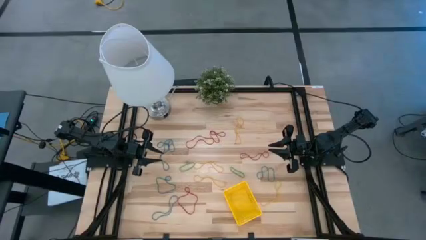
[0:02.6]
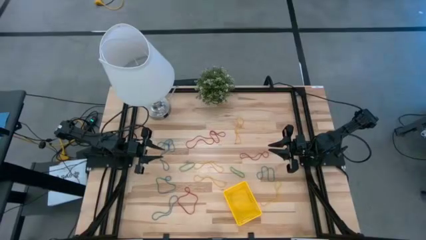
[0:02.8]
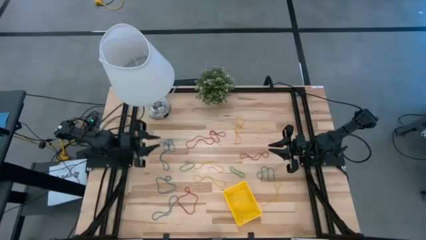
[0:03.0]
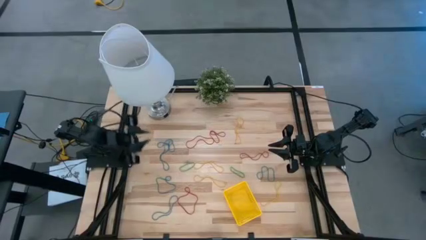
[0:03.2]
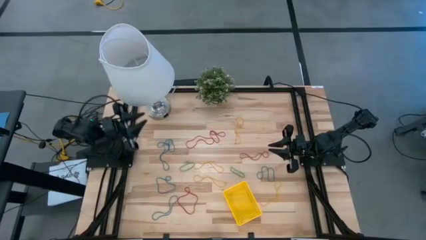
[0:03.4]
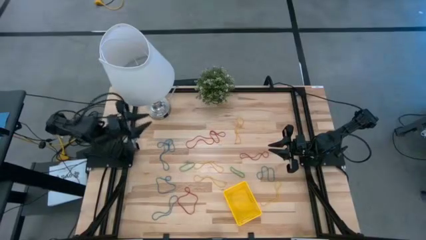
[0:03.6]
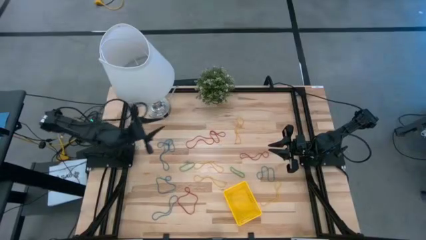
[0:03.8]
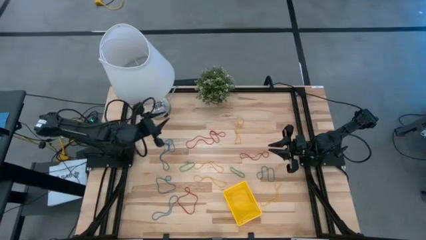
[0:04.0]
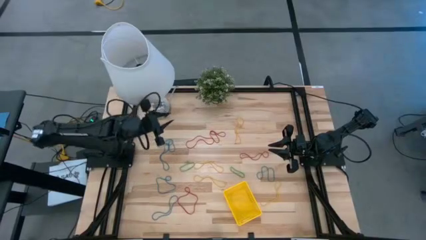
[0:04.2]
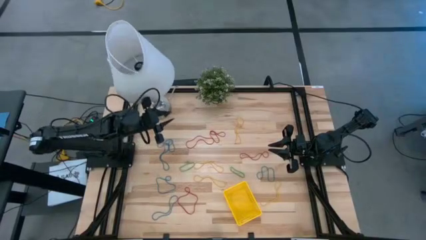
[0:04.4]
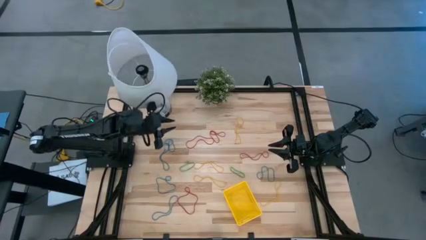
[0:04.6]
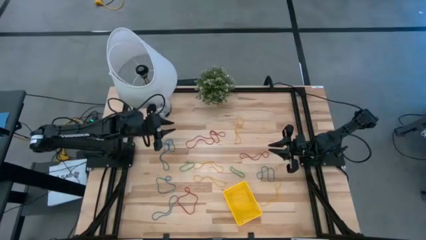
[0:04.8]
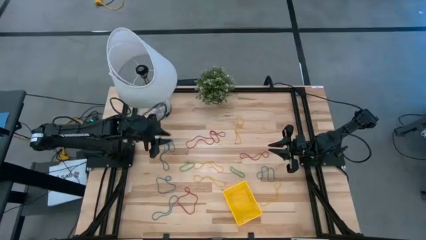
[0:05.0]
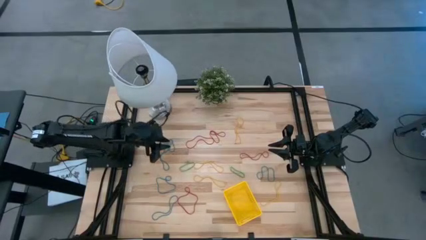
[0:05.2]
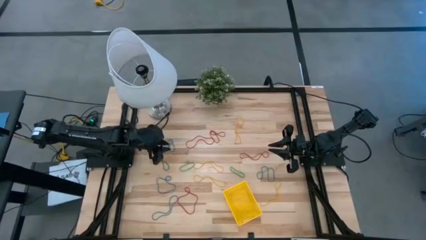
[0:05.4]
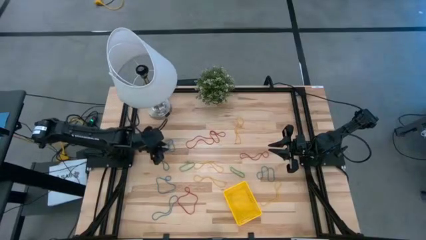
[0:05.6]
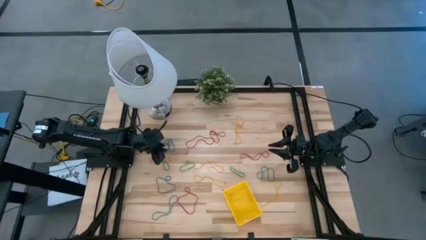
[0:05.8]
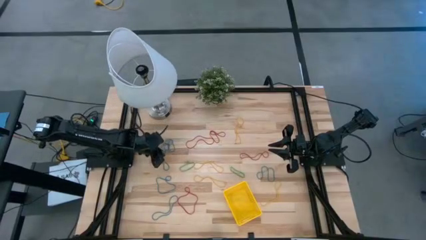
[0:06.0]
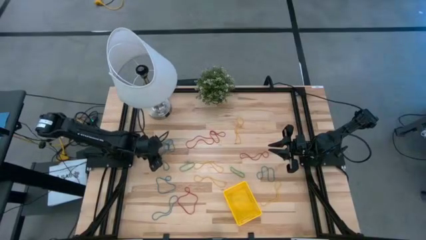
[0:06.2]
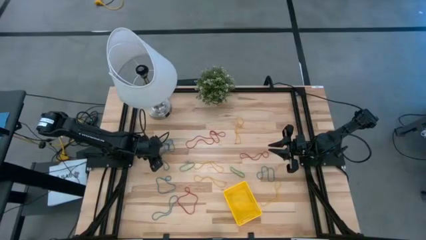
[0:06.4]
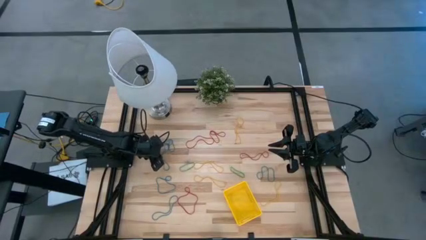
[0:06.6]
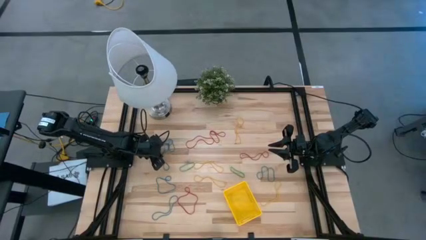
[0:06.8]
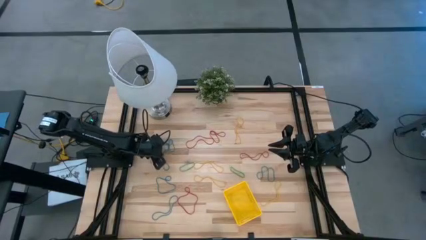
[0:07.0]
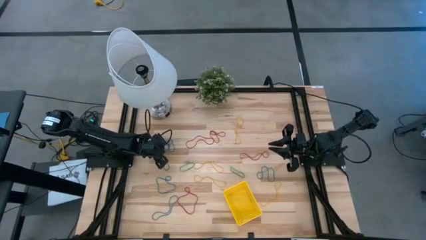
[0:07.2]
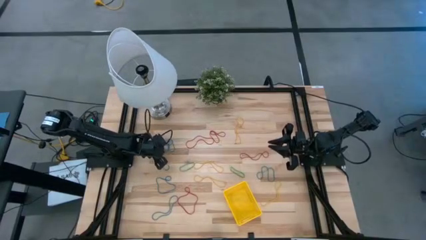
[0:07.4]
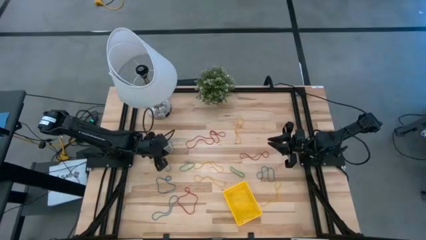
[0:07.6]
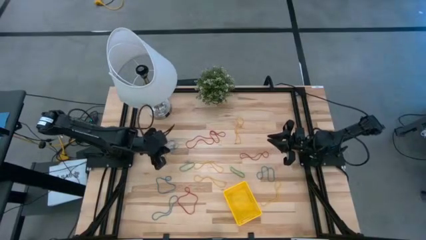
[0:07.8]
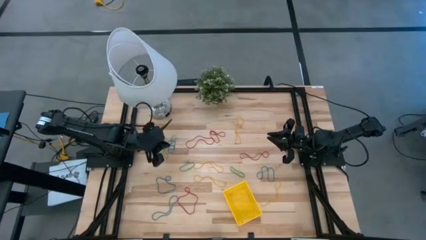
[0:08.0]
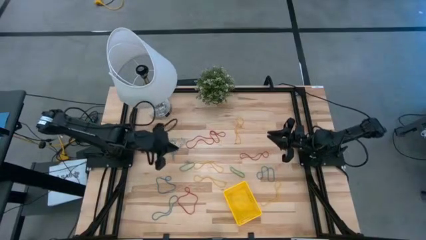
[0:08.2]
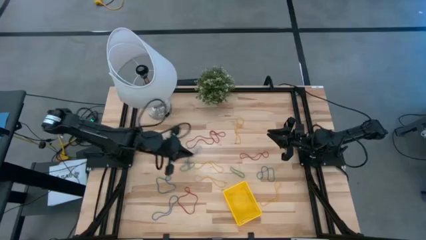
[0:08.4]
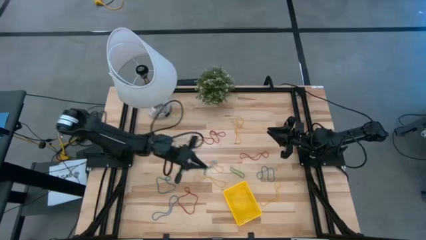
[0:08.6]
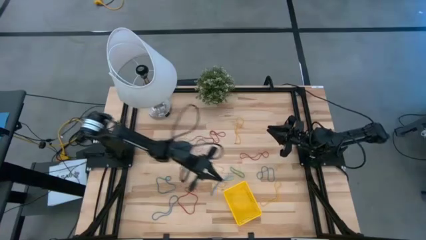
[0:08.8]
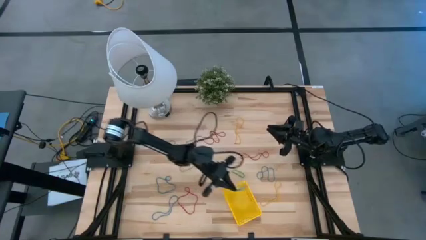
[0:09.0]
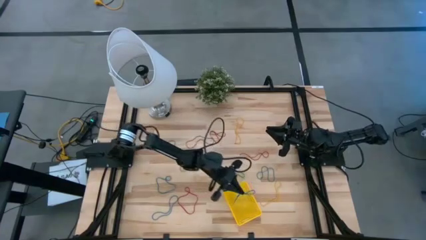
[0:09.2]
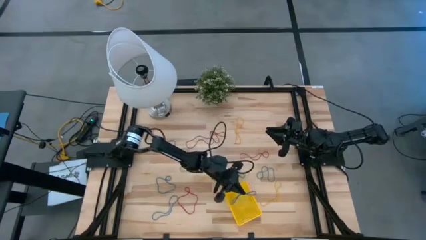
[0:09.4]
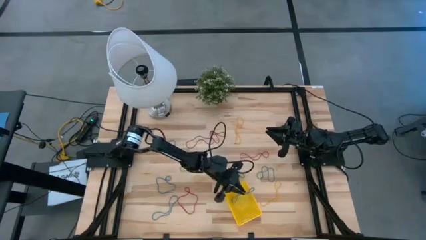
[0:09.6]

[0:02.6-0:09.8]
Task: Pick and place items into bin
Put the blue rubber band into the bin

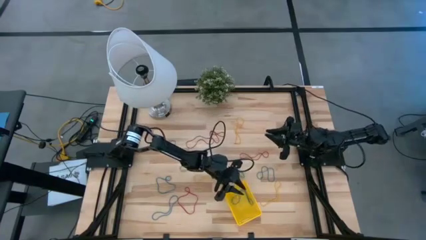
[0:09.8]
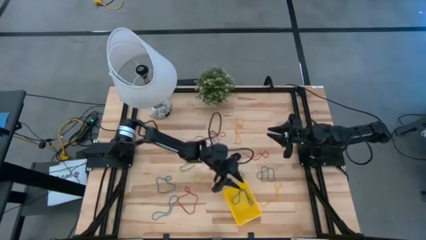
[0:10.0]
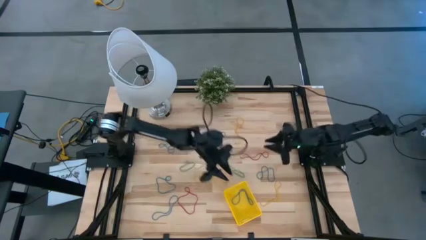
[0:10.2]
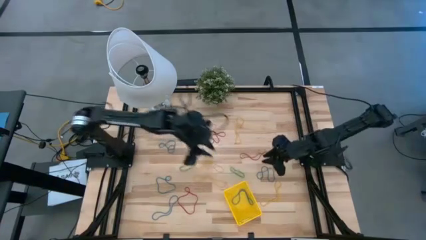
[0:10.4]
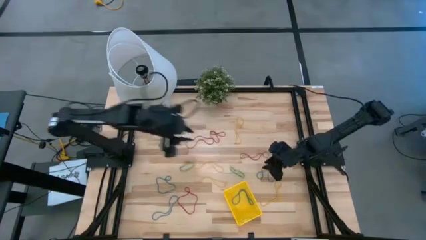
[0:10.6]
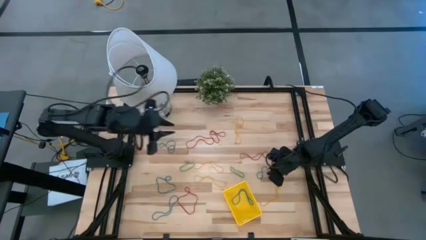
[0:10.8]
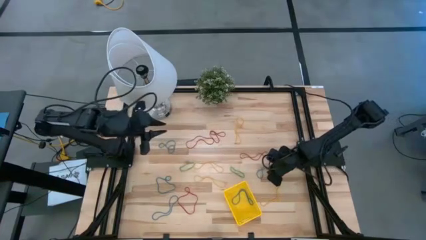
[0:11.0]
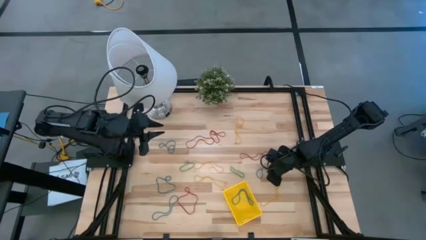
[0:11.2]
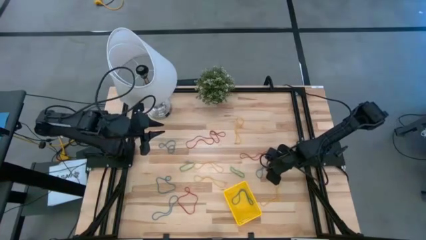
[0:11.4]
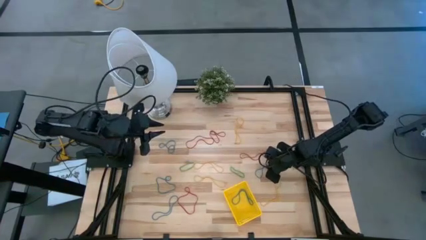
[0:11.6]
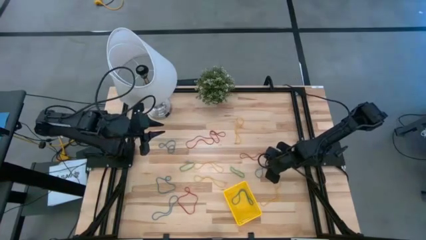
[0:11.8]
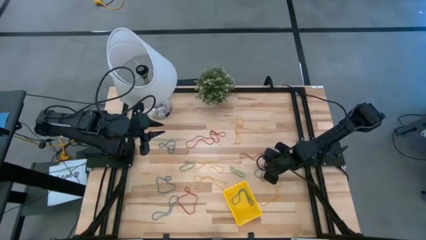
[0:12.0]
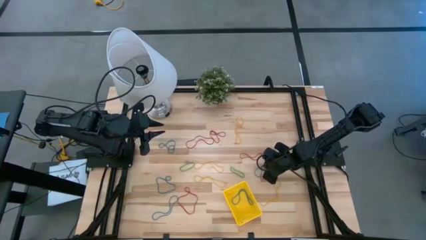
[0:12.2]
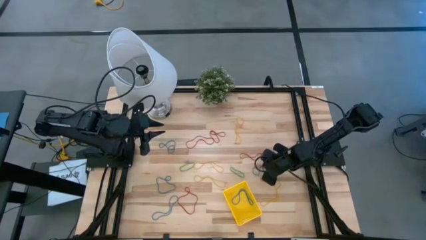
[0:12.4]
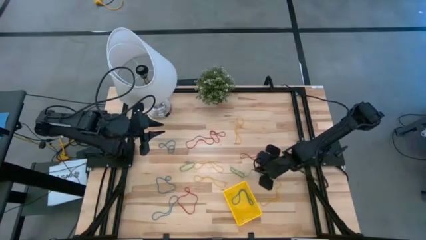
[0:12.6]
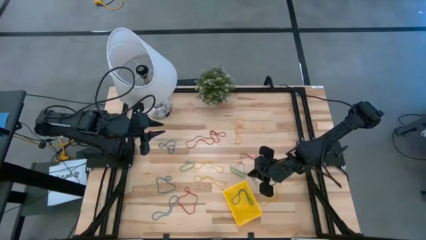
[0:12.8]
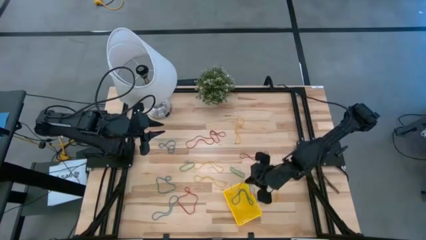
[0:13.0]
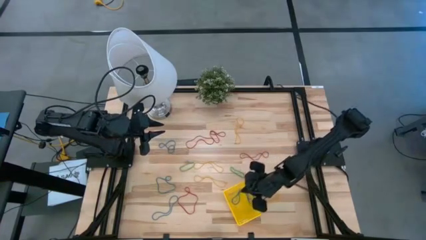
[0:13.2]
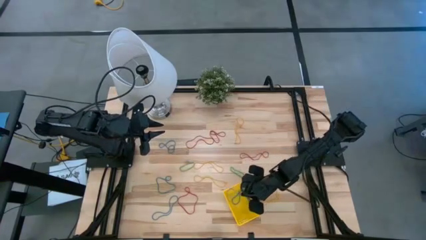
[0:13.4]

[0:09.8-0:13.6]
Put the blue rubber band into the bin

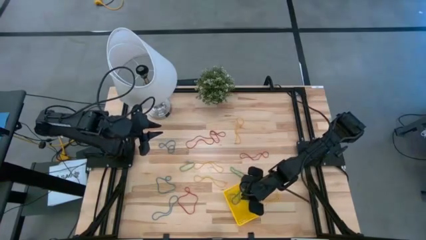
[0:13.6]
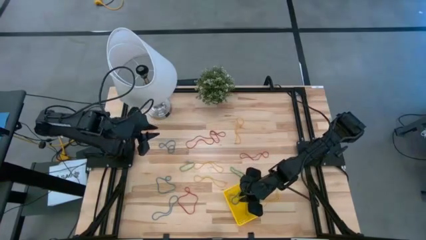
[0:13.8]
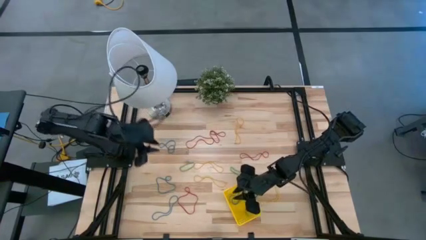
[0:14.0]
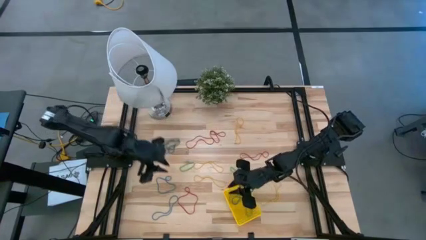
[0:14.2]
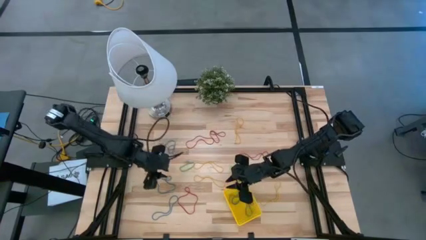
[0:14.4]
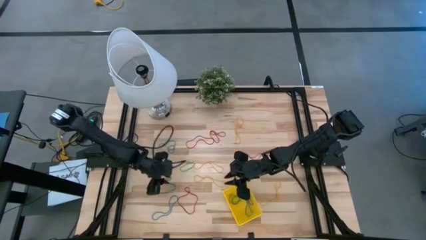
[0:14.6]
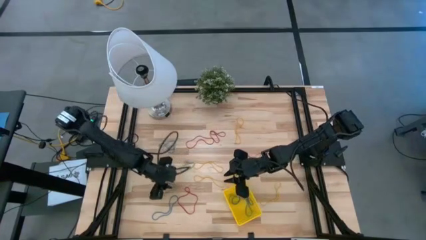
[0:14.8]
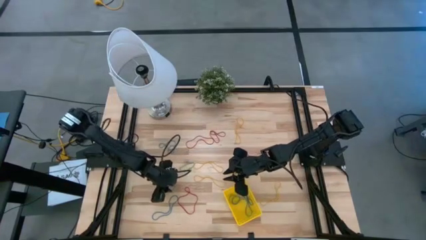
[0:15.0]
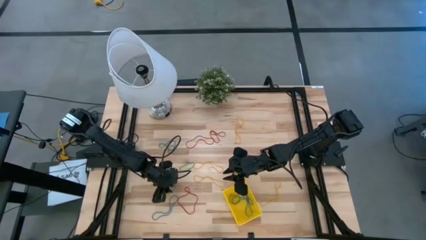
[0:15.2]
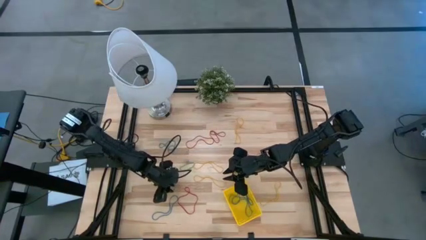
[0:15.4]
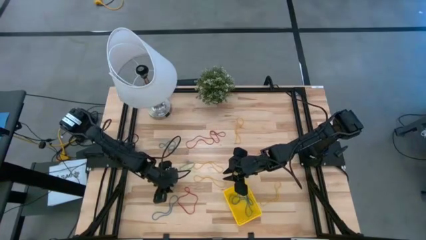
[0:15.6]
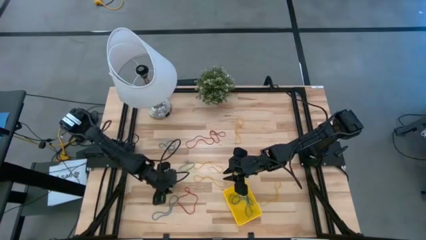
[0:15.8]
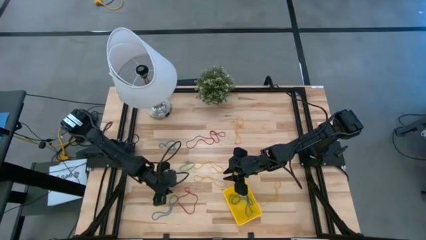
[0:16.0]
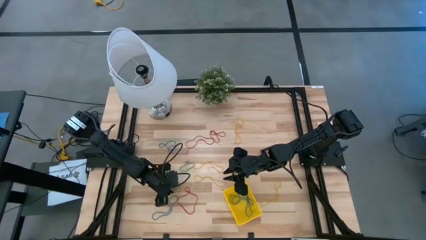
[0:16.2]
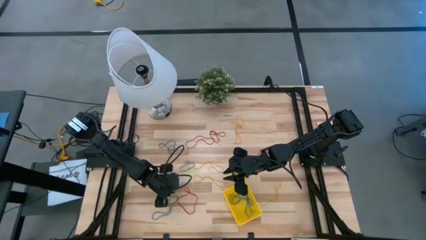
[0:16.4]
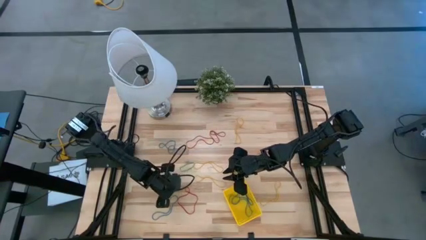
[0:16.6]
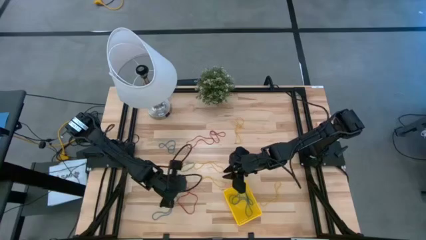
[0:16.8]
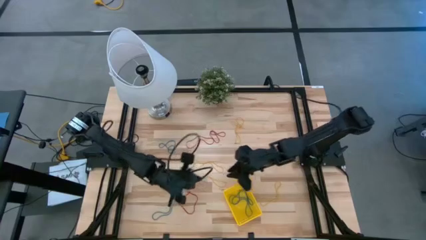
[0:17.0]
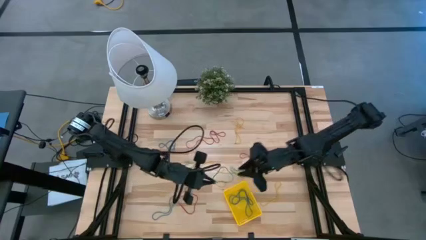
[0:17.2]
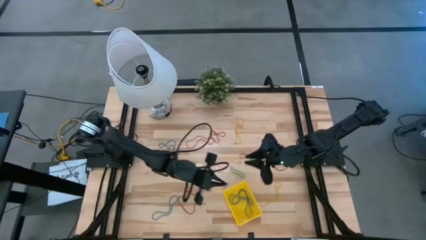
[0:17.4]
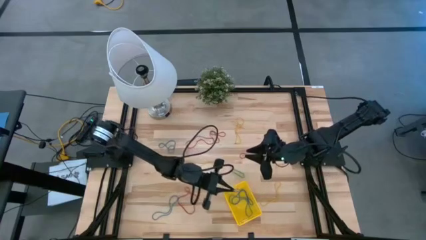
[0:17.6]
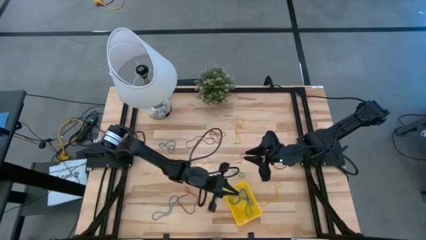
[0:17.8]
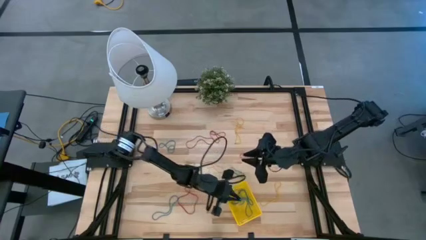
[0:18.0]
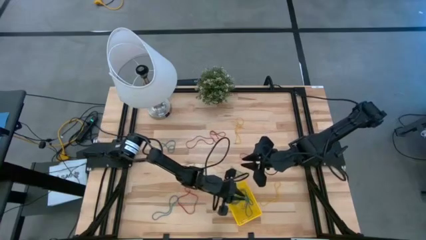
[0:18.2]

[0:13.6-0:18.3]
Put the middle blue rubber band into the bin
